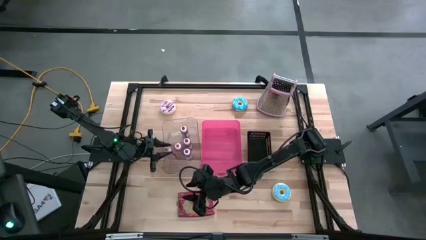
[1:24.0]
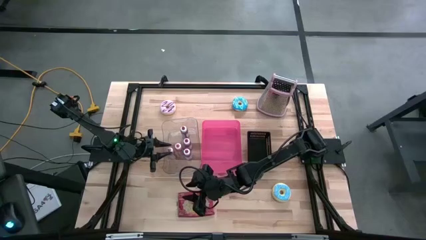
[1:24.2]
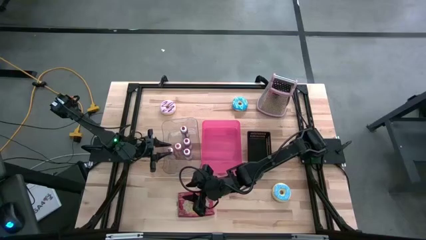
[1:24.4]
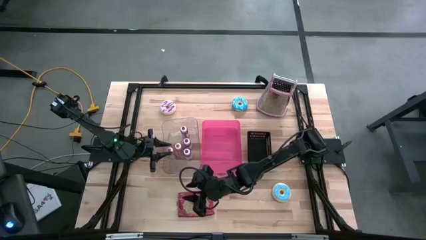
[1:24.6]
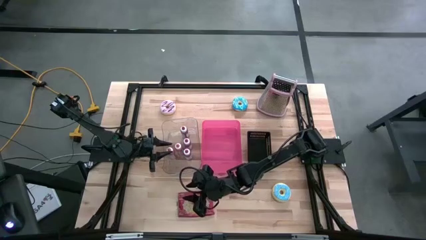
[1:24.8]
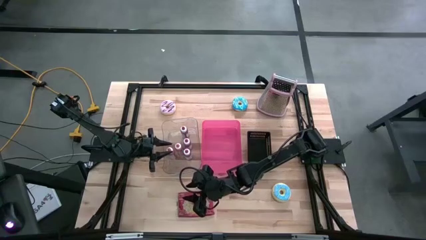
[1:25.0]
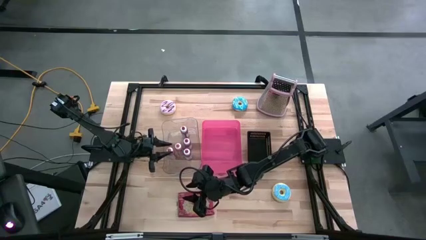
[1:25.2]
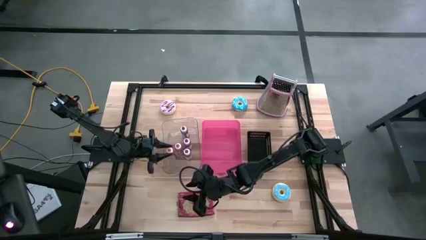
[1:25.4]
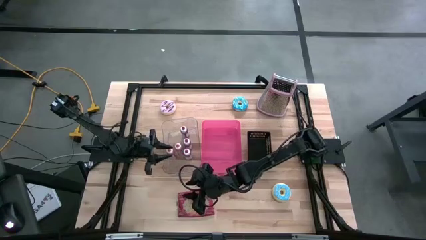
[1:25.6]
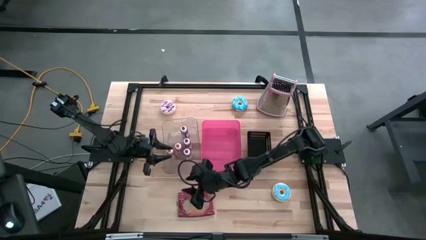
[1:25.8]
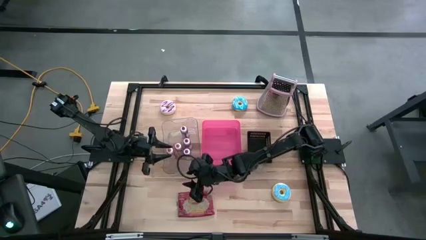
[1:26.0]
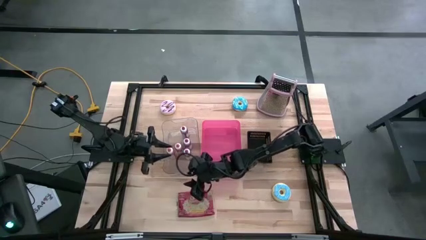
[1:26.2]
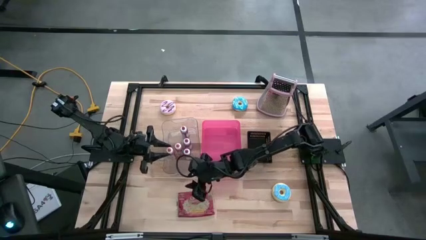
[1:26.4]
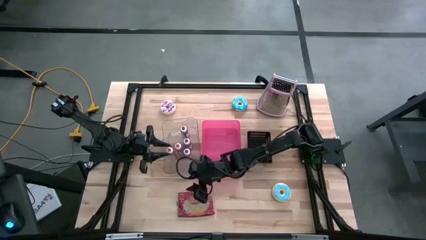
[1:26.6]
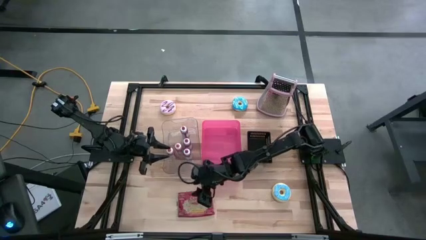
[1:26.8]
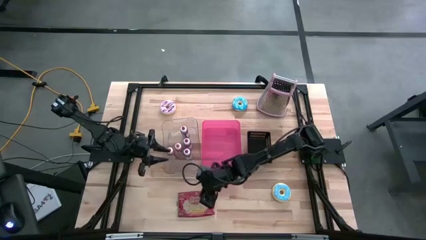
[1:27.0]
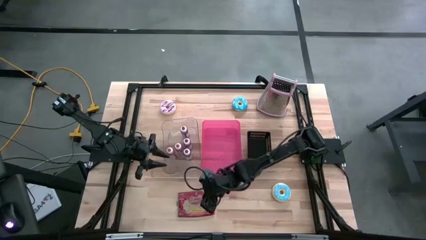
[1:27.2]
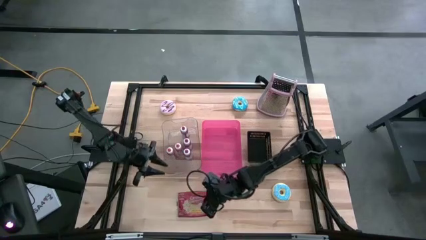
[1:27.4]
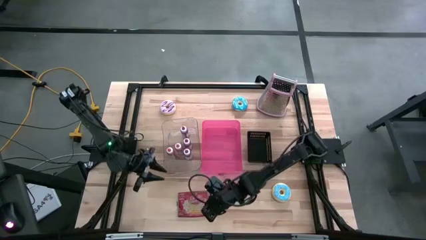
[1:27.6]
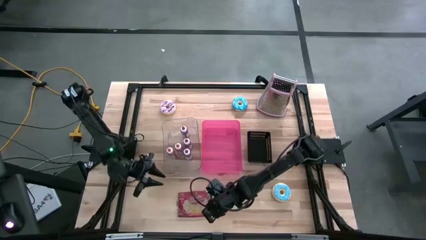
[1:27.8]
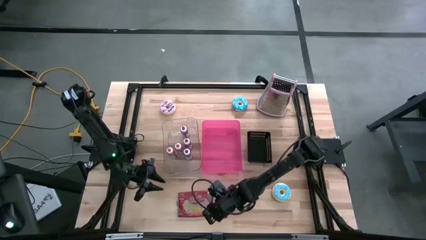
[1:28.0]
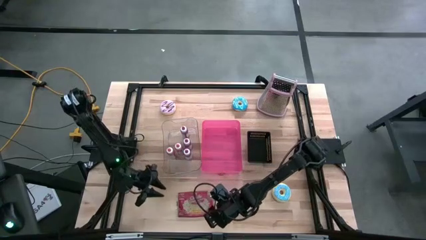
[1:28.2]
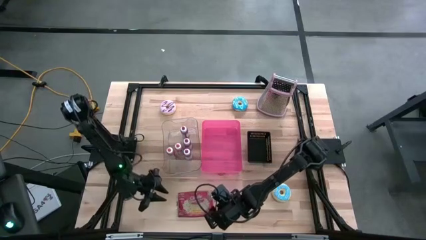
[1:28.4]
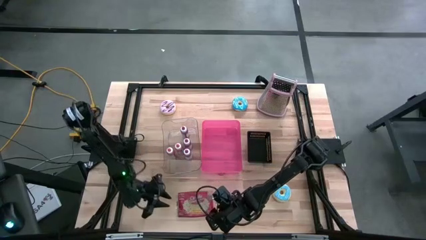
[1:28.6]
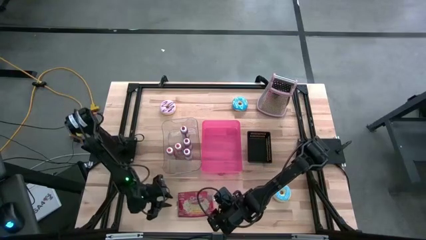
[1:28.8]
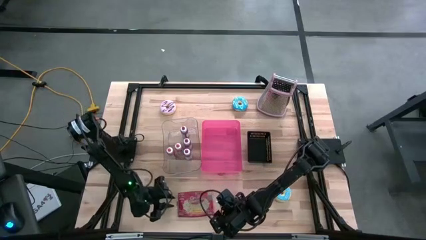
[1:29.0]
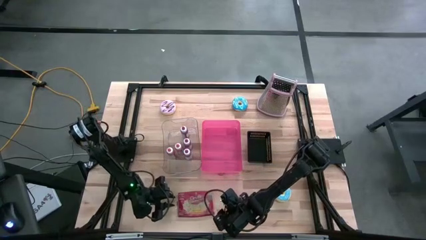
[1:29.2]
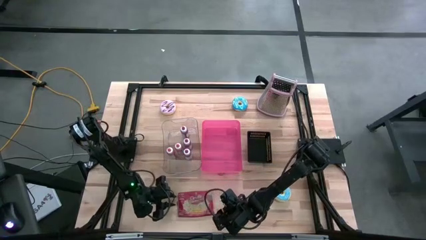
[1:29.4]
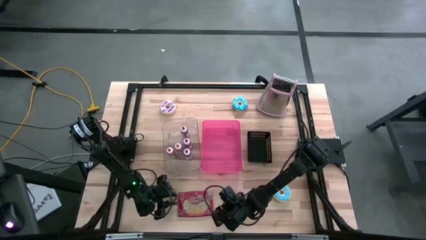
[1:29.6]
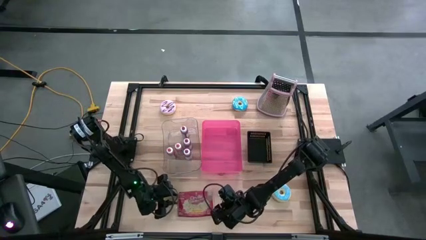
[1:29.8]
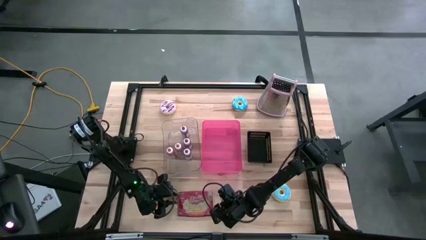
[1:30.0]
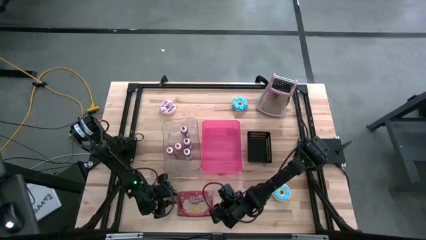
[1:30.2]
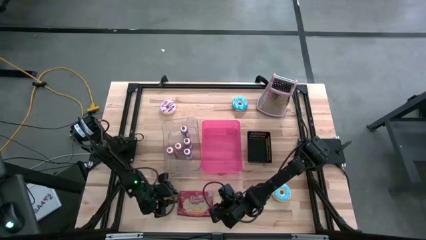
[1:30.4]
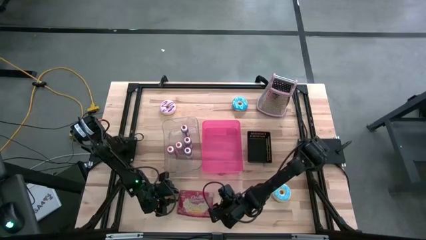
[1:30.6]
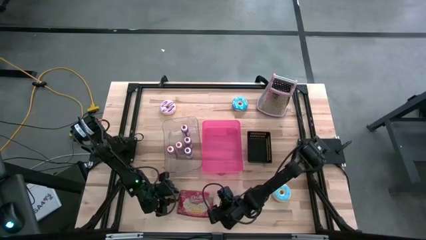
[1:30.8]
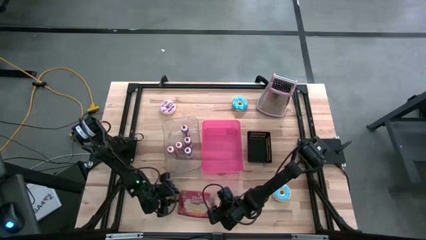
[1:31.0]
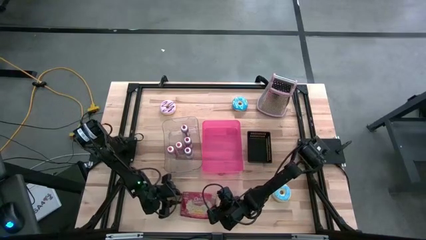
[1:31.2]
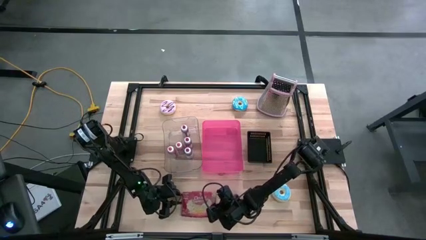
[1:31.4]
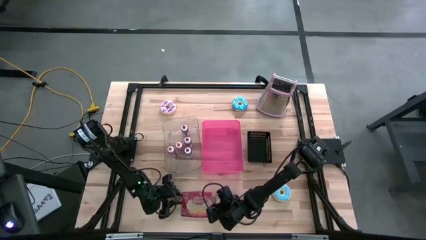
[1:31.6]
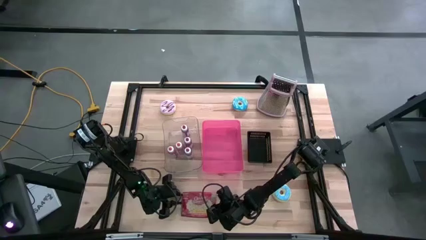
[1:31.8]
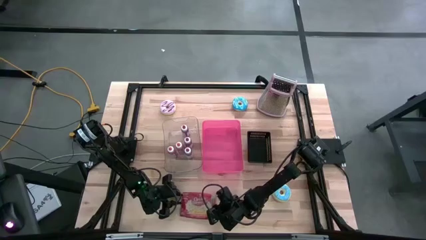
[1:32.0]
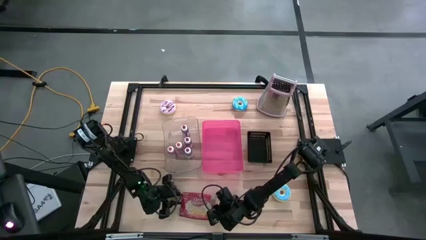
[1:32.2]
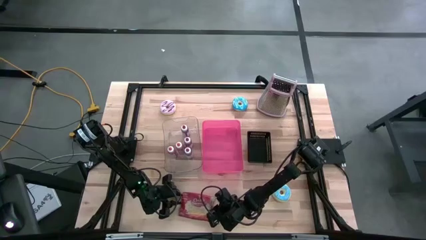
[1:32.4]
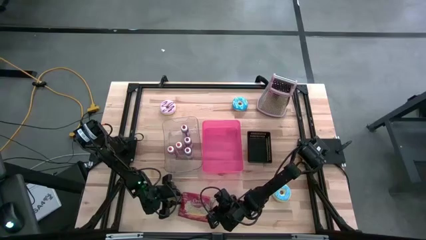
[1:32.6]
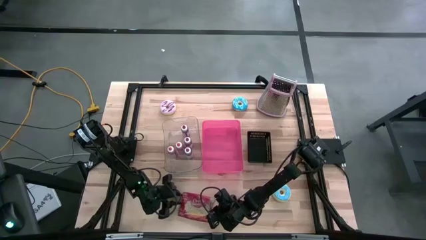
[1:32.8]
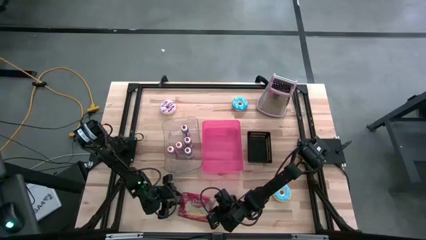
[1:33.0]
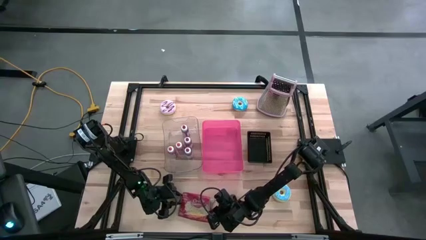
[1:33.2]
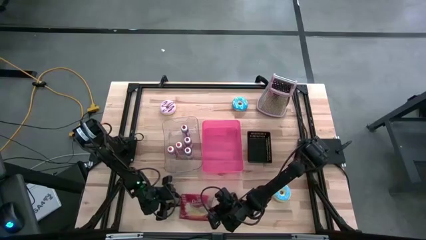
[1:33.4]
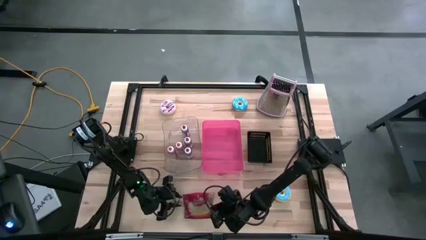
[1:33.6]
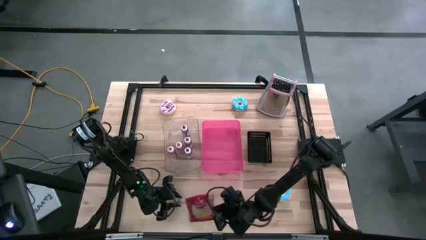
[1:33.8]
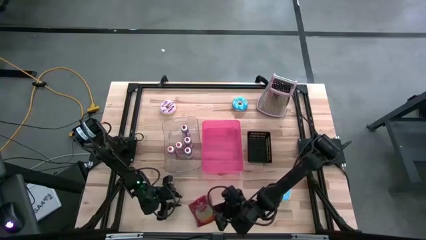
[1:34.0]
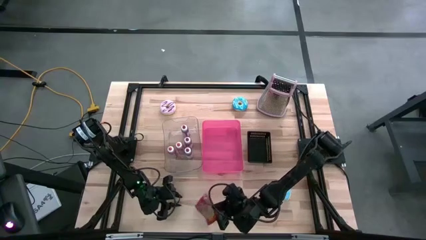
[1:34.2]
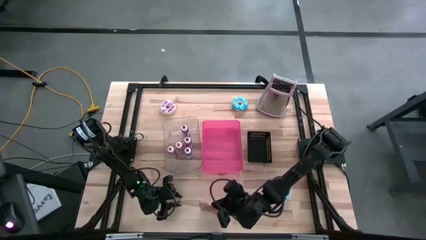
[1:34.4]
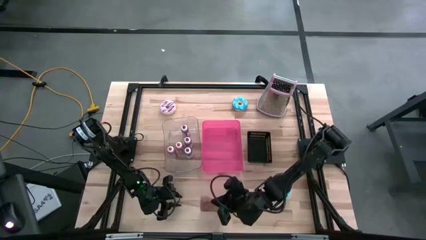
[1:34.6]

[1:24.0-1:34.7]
Task: Pick & Place Food Item
Put the red popcorn pack into the pink bin
